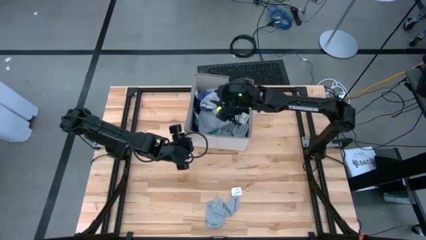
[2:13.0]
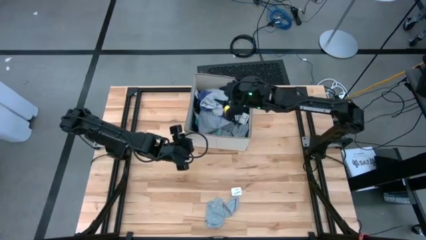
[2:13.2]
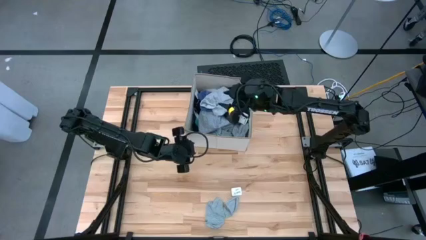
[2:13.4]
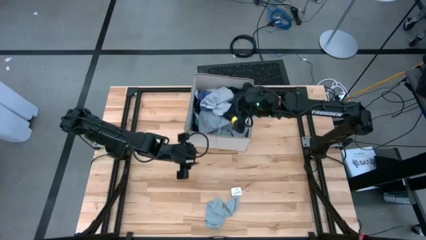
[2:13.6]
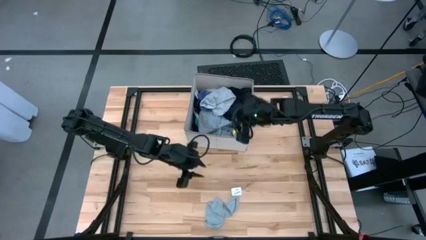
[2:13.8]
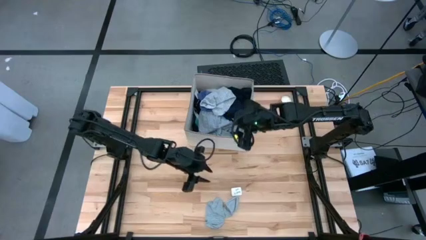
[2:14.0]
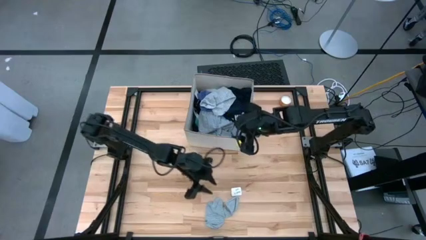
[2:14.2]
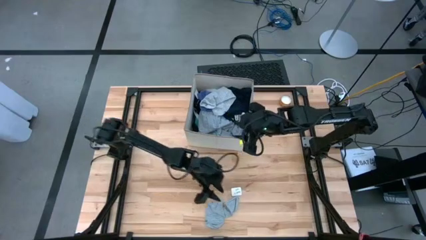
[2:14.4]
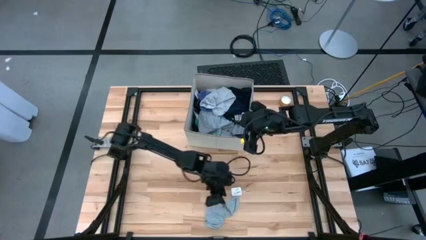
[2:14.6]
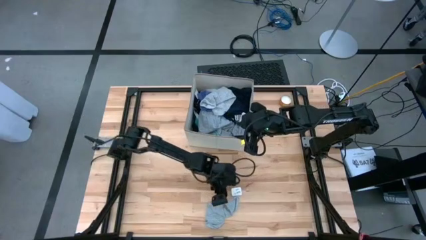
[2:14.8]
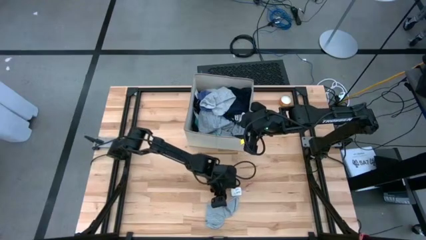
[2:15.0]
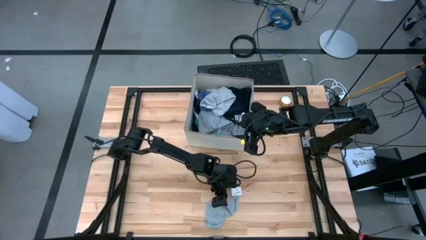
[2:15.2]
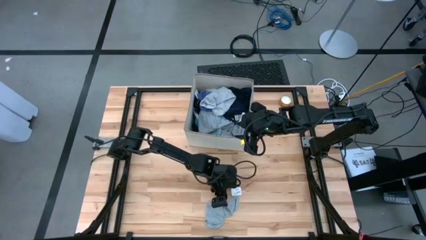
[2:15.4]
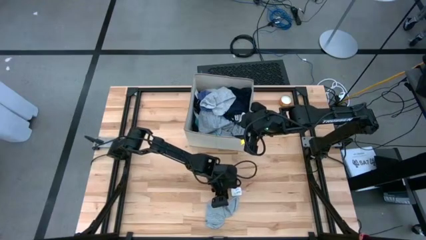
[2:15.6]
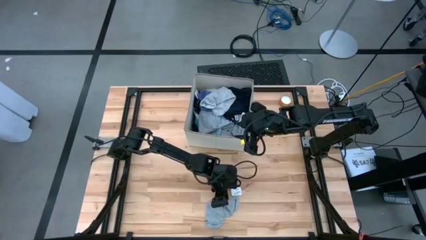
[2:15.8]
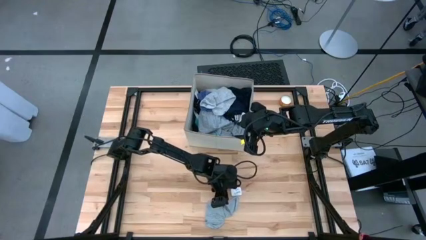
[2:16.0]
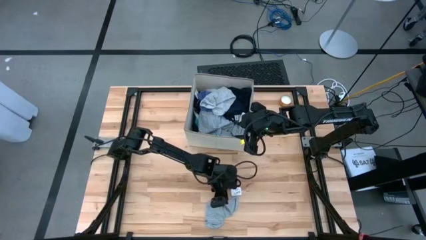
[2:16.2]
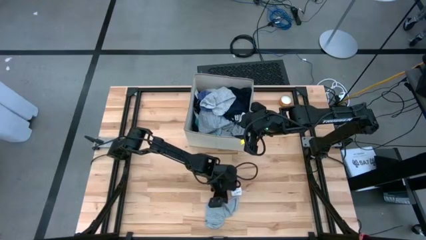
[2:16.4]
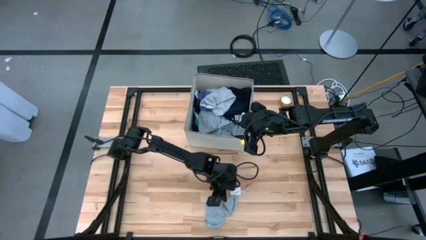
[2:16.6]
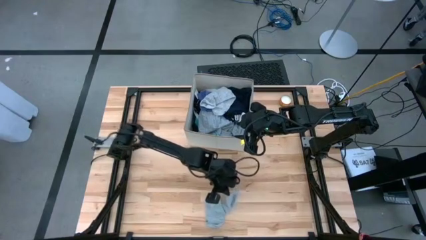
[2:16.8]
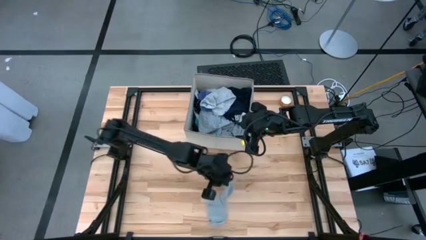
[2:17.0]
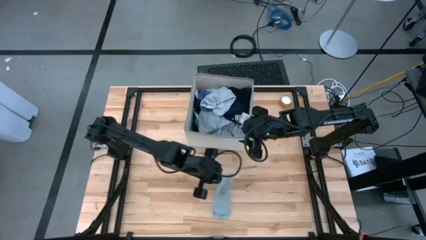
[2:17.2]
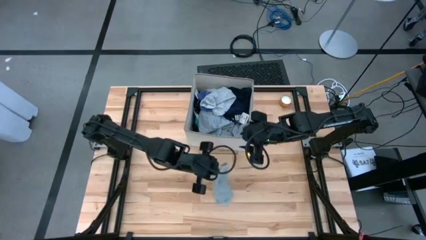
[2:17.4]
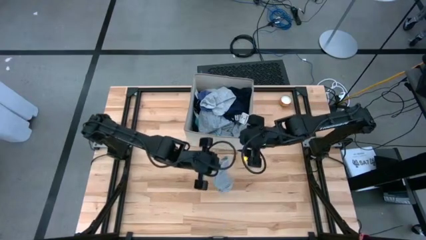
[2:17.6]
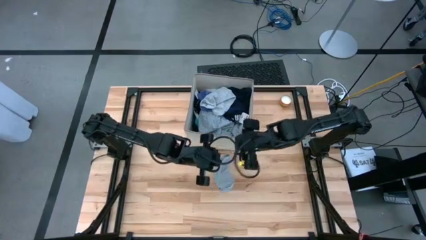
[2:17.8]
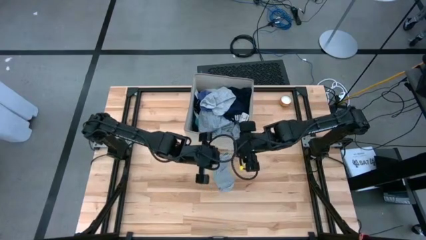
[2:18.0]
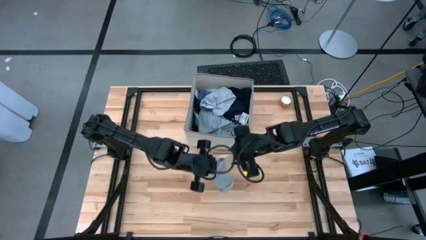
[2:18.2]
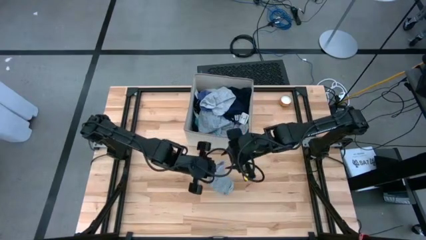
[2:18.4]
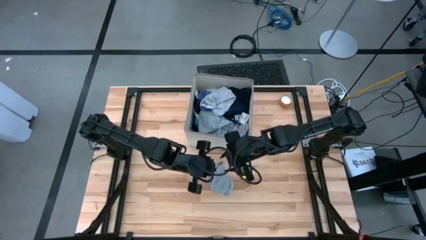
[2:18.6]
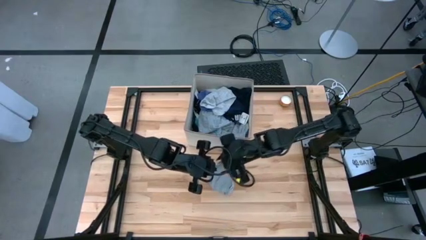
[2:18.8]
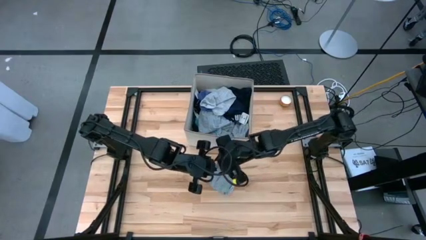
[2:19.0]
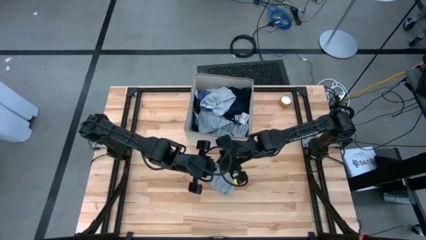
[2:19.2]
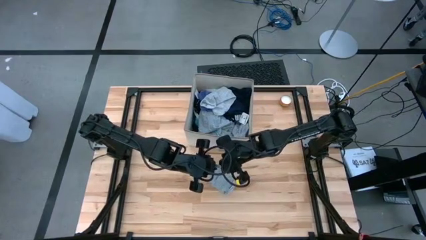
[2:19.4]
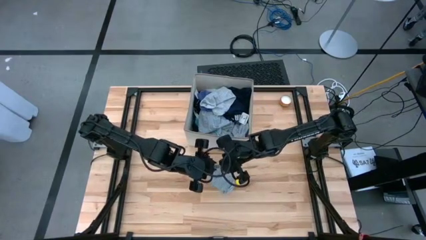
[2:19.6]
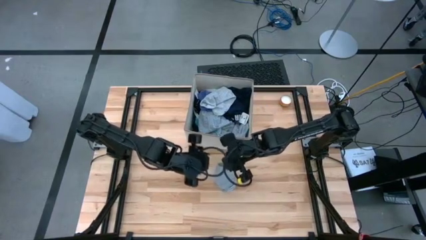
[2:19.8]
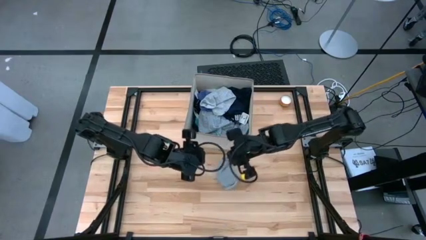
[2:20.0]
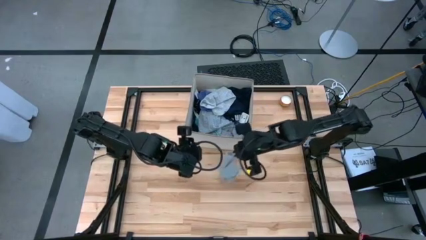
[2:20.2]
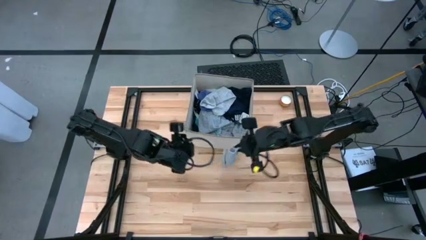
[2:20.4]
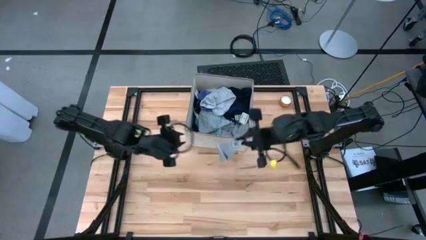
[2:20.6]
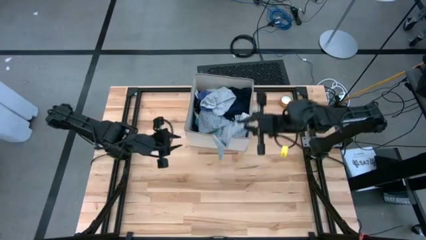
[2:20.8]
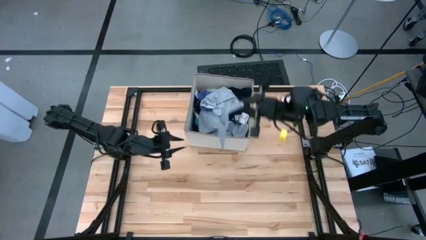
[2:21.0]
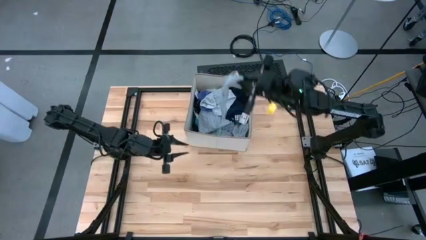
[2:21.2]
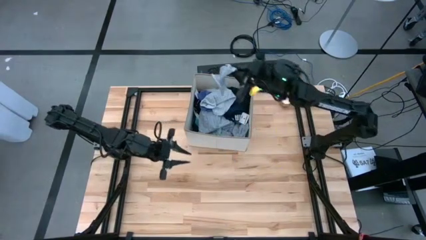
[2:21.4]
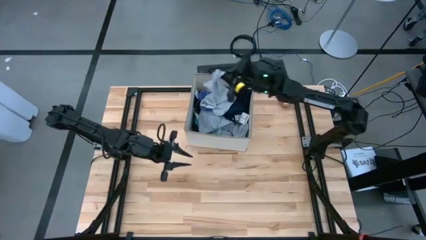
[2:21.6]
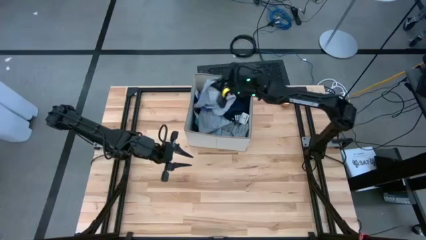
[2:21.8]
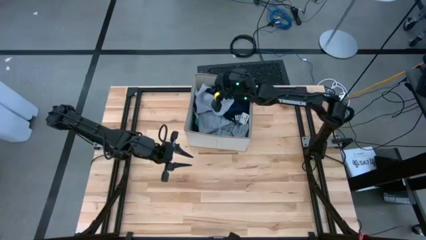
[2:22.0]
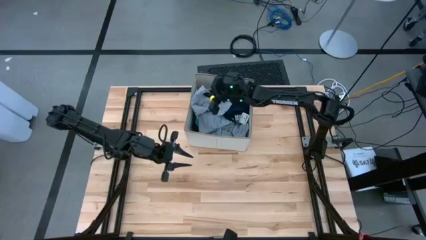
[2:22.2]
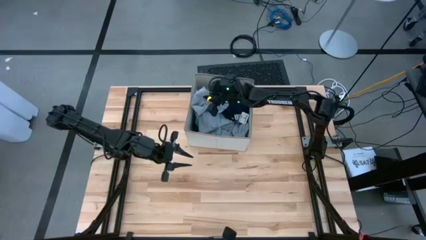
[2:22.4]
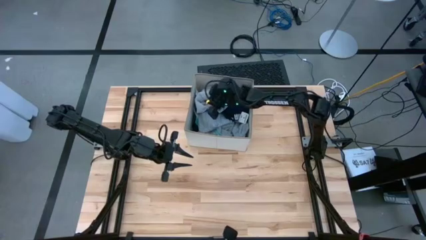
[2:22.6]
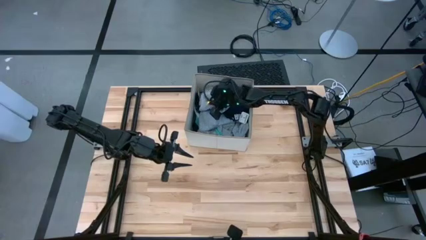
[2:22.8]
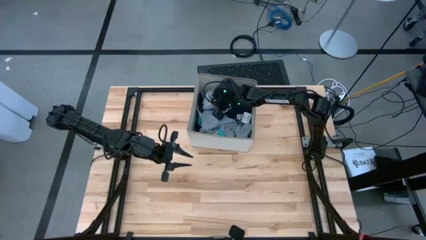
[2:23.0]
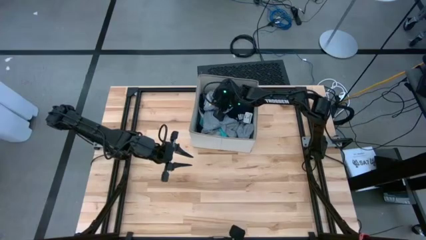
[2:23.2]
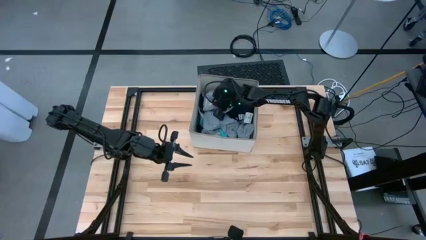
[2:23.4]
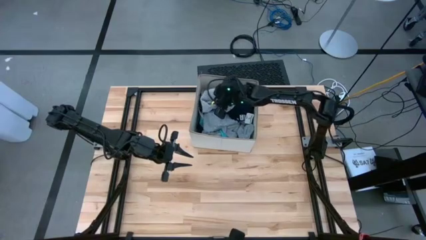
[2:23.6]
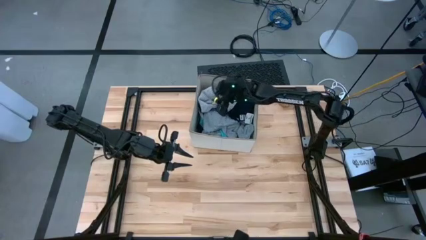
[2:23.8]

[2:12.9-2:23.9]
Task: Sort clothes
Put the gray sock into the laundry bin

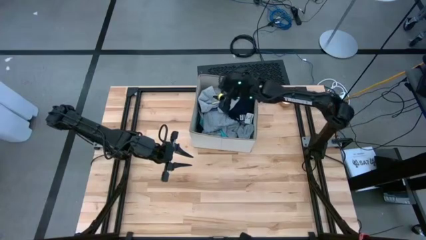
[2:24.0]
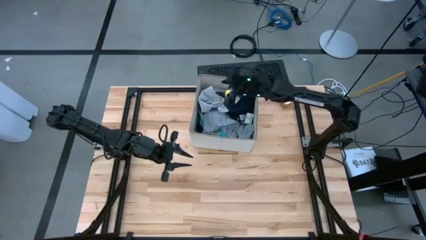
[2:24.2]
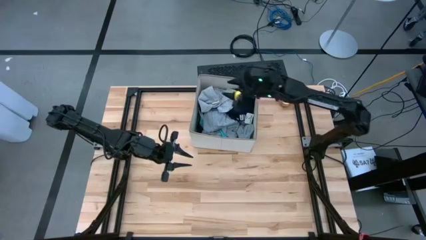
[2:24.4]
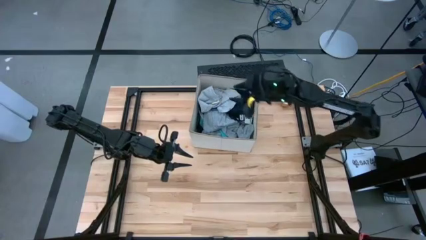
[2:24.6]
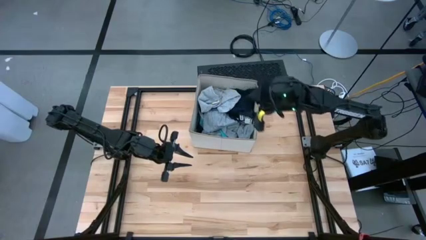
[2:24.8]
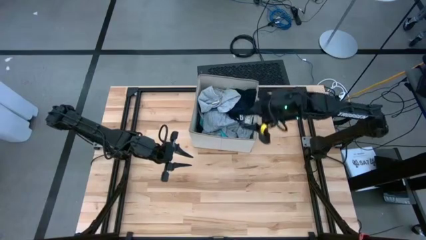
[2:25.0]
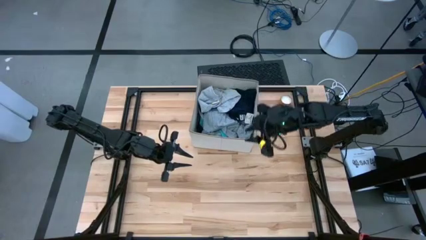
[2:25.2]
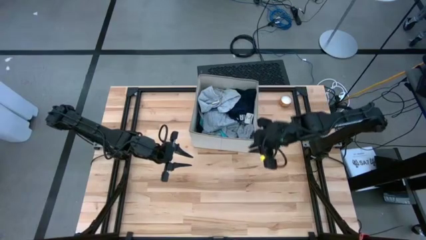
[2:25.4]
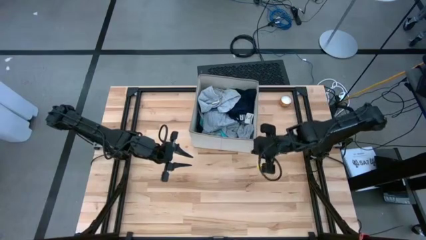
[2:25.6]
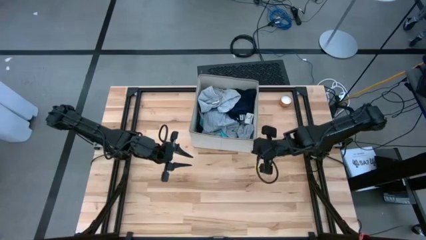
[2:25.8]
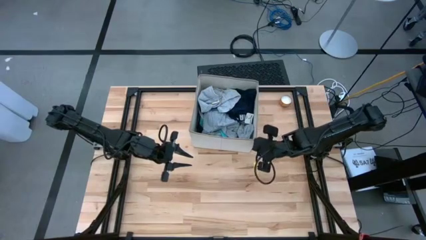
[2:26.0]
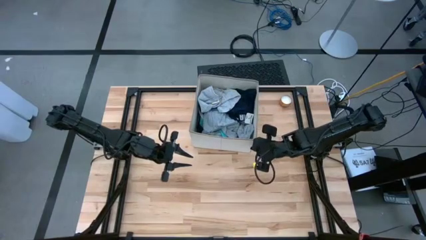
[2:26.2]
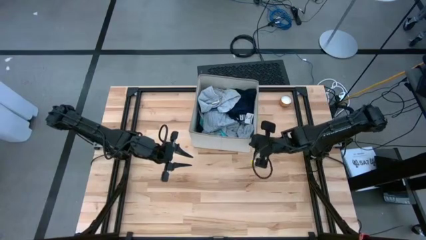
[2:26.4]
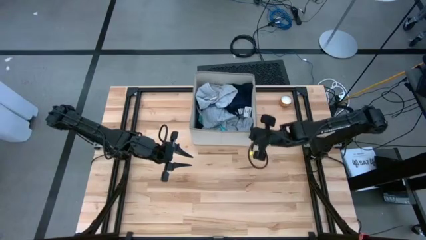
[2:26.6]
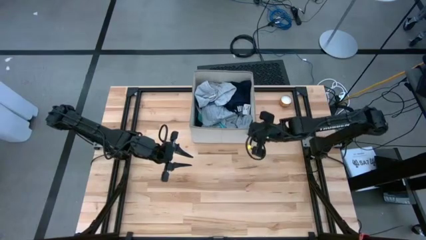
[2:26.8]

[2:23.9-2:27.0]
Move the bin to the top of the table

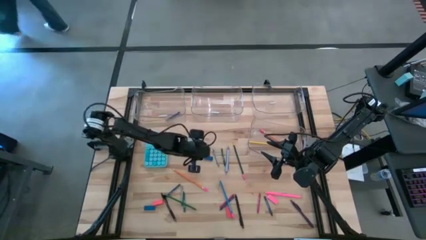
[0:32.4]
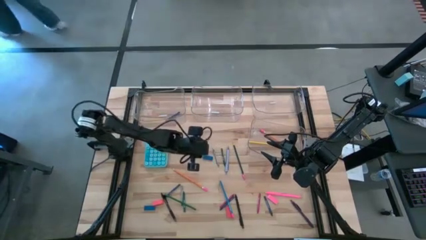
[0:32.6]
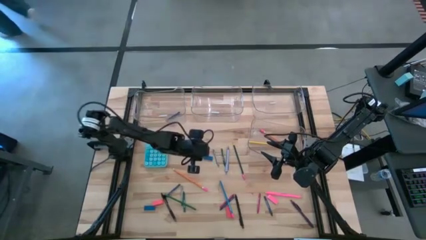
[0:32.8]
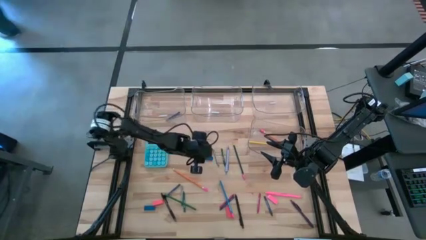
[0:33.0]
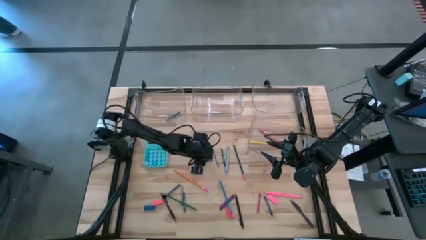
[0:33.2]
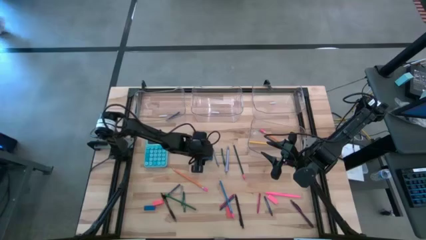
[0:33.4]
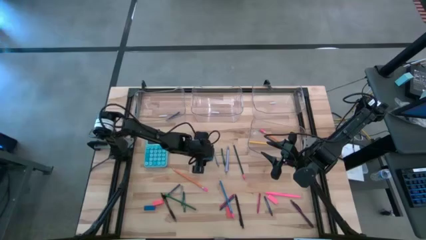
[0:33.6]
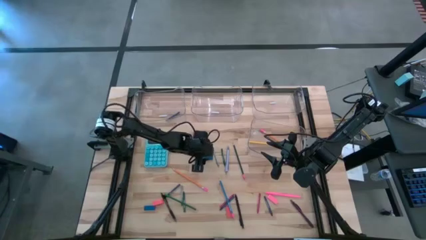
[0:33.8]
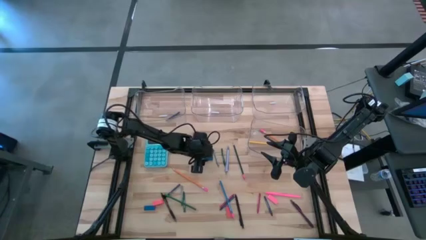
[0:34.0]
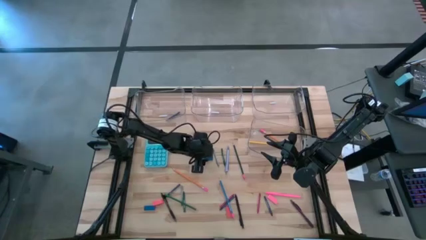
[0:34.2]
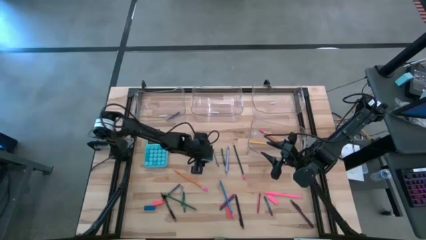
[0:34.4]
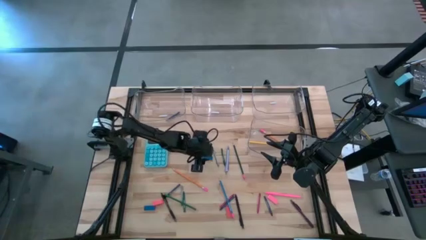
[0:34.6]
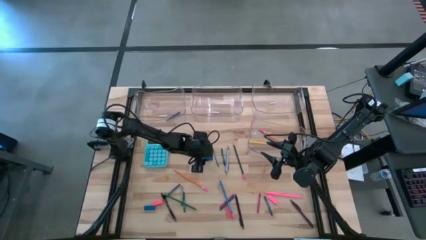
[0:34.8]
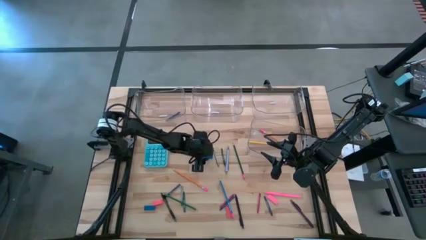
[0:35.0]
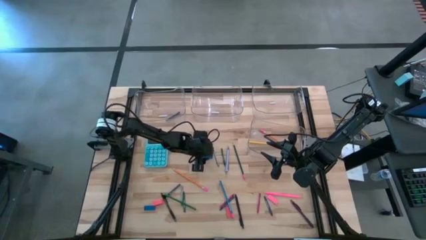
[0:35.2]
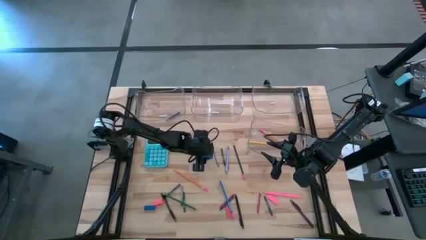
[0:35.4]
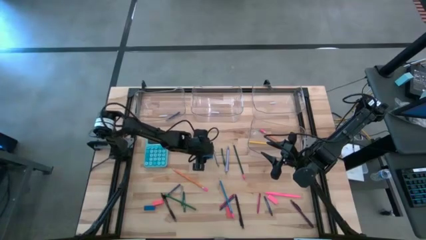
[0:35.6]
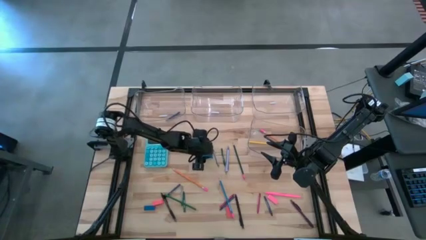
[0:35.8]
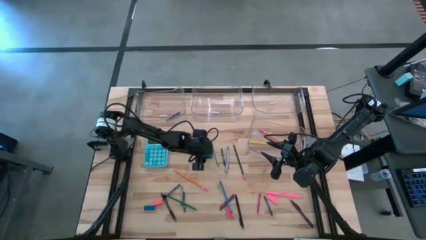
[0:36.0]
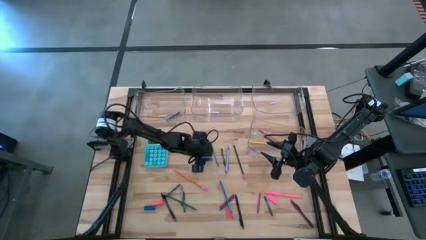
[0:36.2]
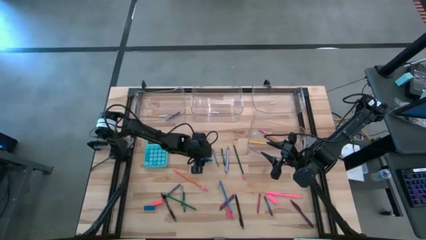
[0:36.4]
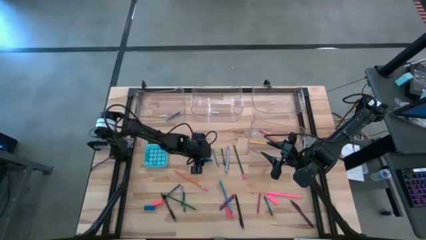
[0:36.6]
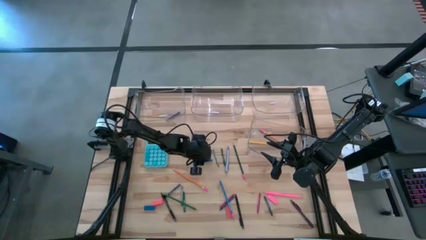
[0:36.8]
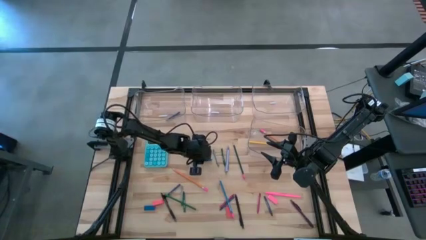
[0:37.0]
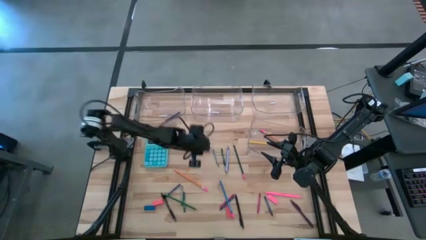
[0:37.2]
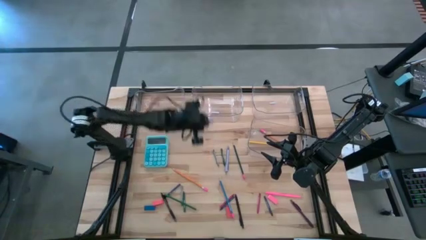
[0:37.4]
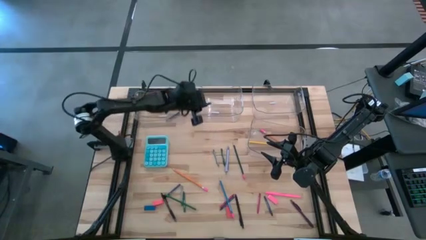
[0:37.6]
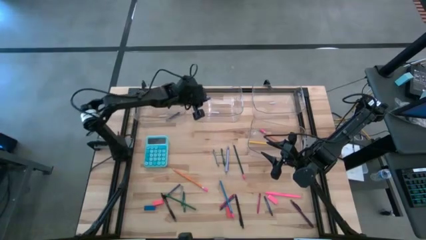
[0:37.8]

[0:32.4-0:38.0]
Task: Sort crayons/erasers/pens/pencils in bins
Put the top blue eraser into the top center transparent bin
